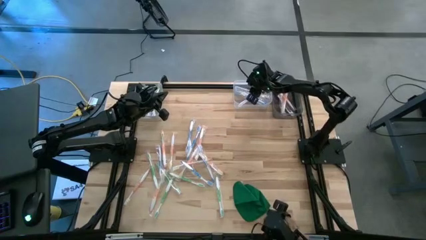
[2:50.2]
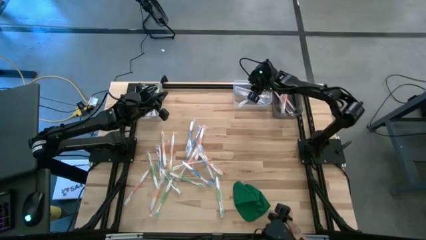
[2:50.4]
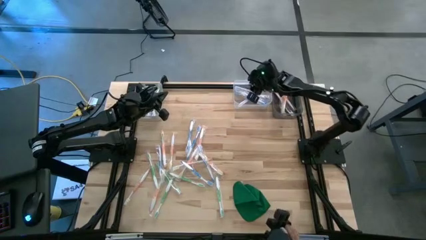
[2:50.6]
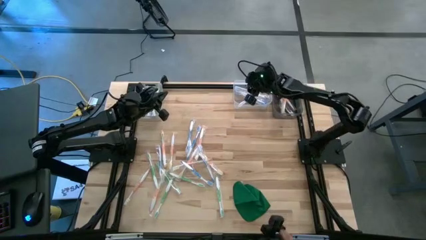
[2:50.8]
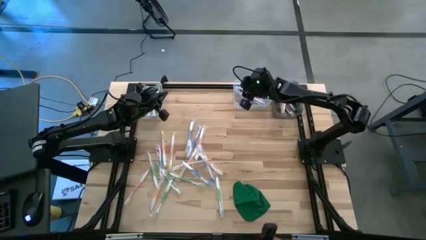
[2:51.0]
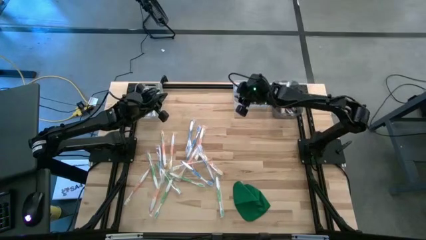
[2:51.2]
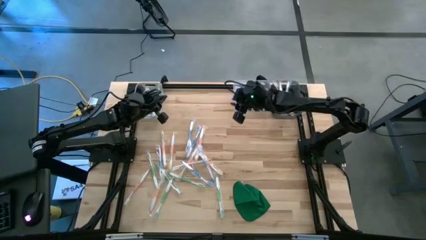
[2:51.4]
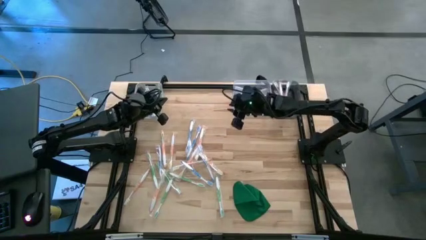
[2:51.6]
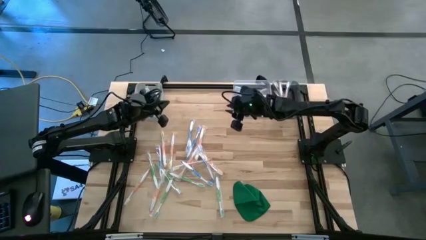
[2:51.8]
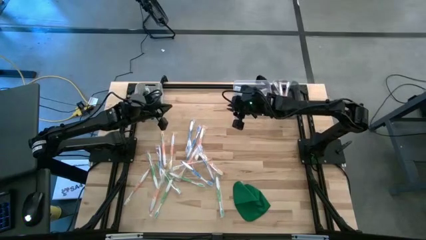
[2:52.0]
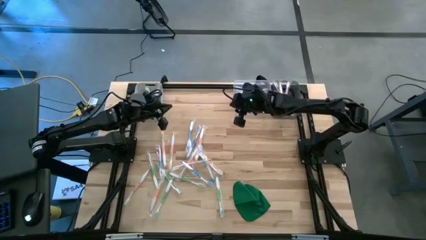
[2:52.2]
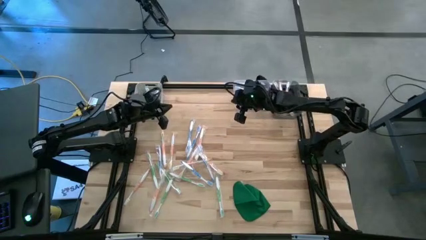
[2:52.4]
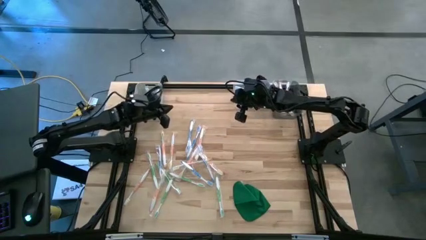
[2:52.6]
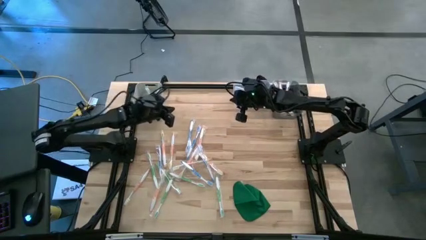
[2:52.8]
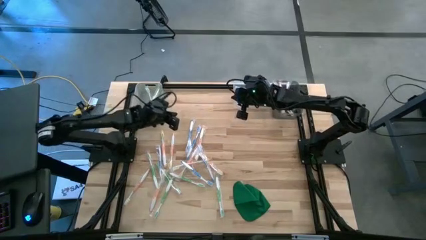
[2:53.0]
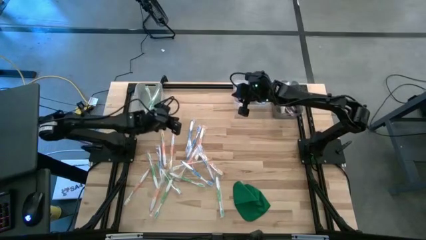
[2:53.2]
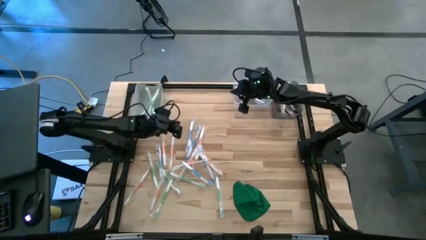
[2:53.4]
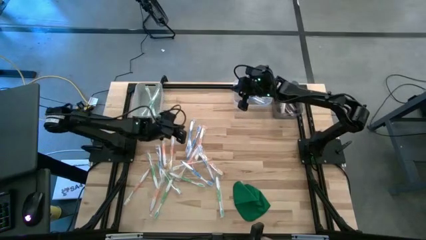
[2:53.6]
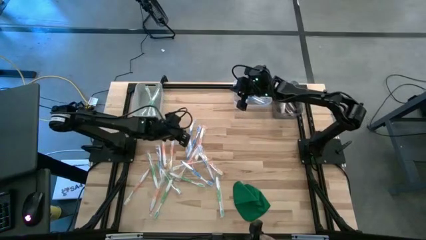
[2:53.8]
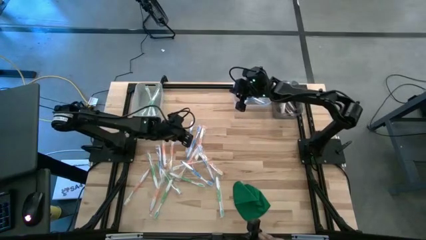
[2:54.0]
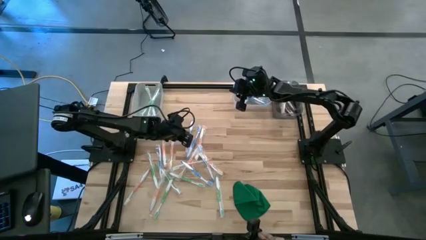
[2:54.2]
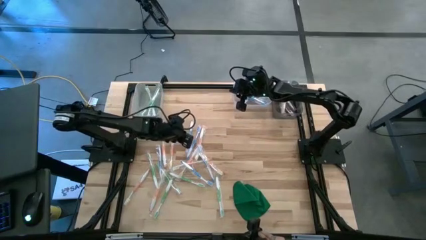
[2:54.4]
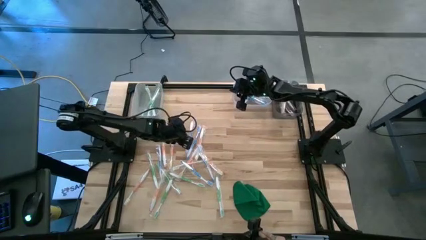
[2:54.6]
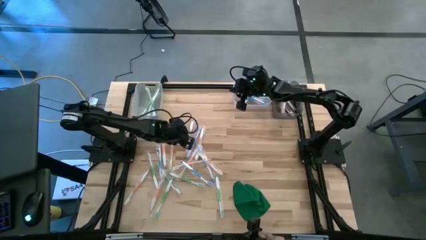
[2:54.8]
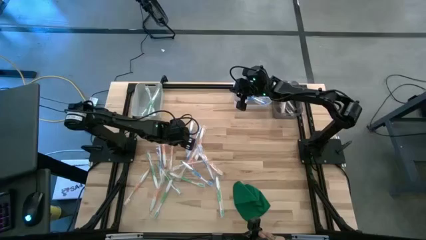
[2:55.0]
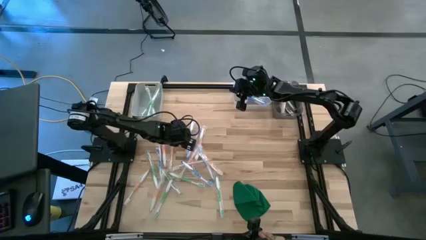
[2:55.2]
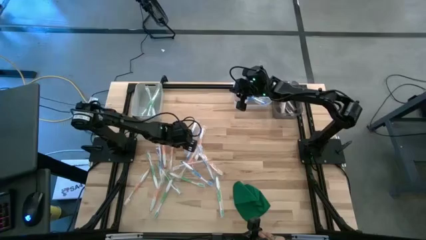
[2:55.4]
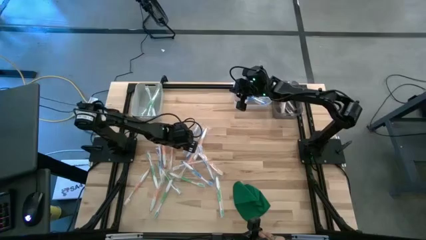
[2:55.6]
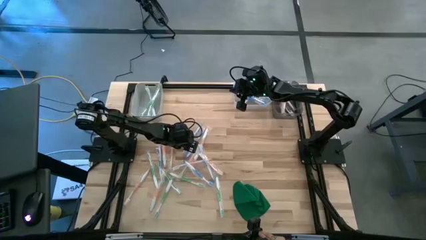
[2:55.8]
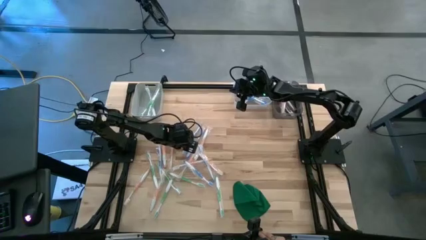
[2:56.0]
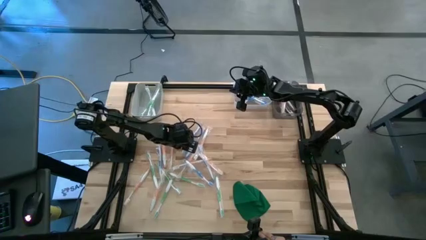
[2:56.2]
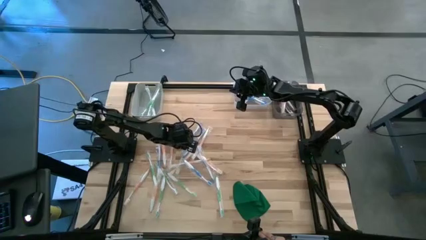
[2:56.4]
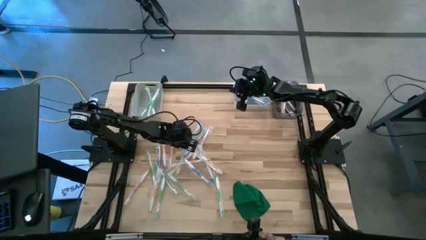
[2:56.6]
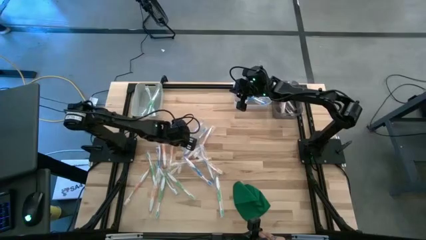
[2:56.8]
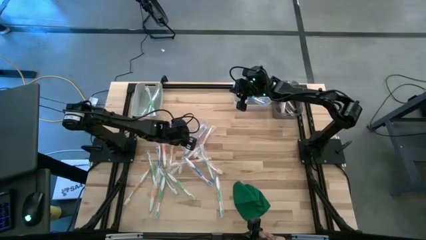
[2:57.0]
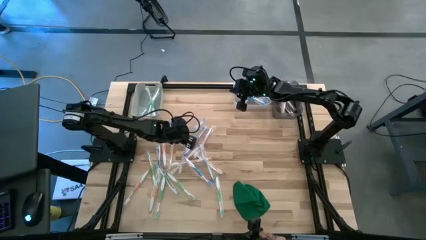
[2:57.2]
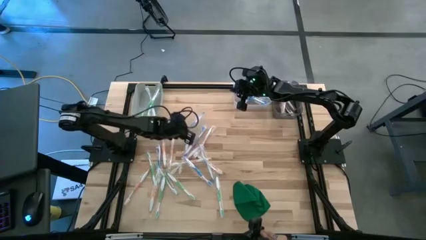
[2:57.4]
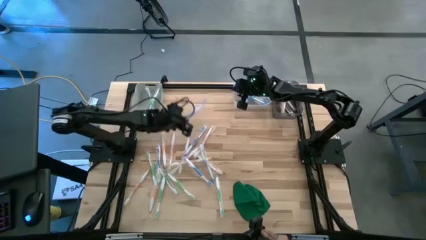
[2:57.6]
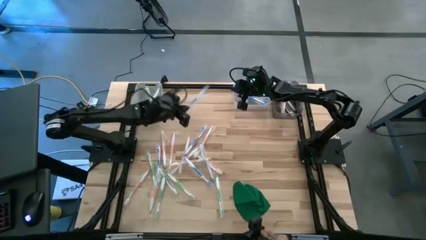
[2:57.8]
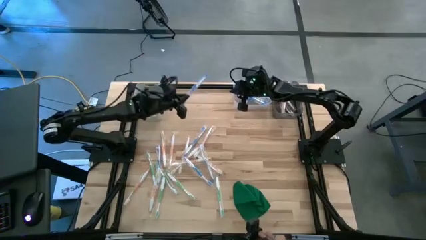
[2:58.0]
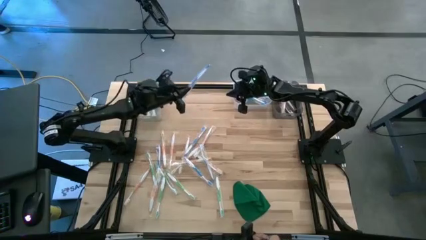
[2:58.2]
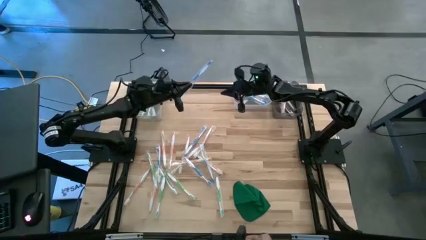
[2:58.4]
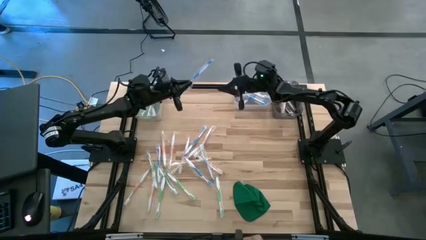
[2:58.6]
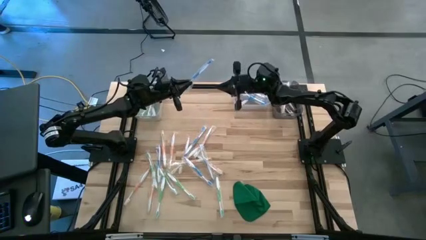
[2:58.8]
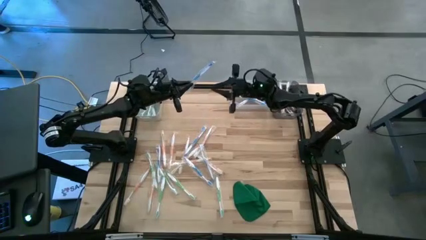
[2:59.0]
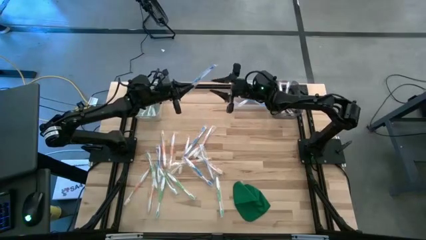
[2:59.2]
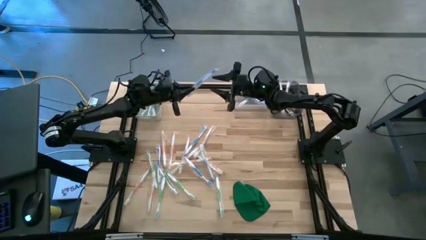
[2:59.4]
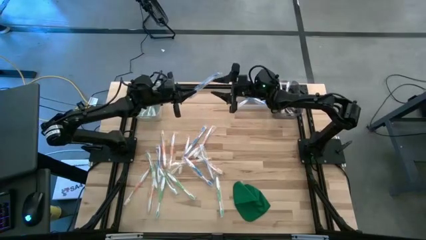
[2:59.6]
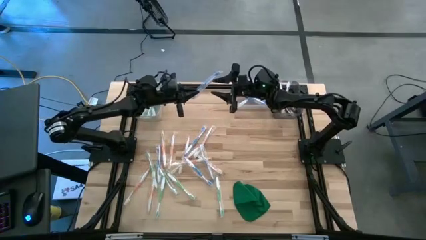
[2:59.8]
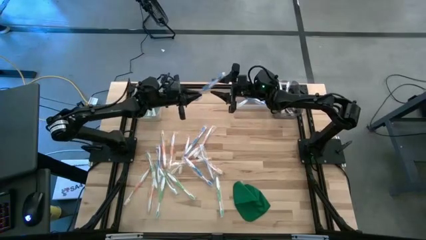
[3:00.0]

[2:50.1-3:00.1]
Task: Pick & Place Toothbrushes
Put the blue toothbrush into the transparent bin

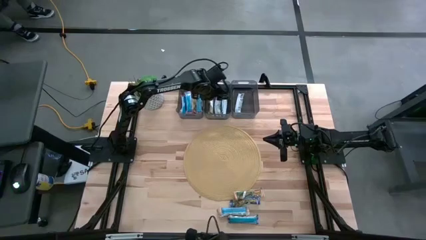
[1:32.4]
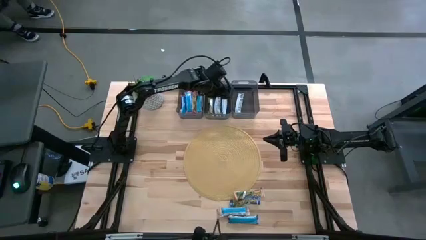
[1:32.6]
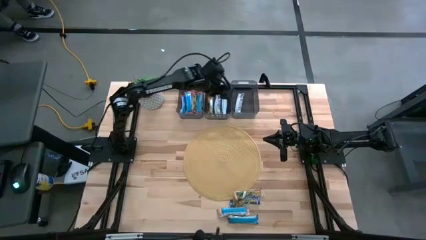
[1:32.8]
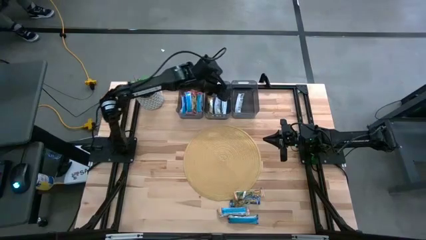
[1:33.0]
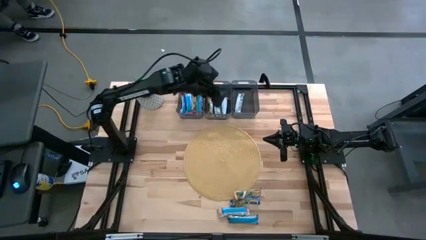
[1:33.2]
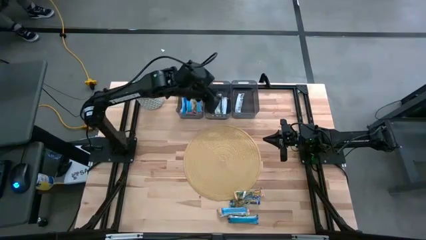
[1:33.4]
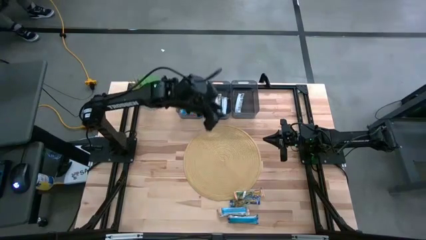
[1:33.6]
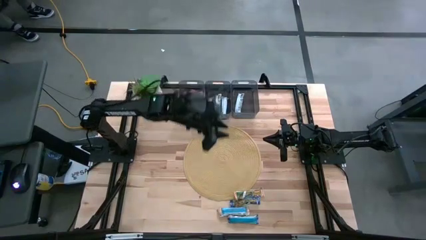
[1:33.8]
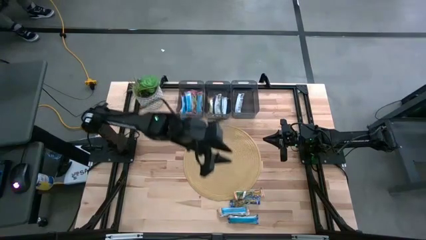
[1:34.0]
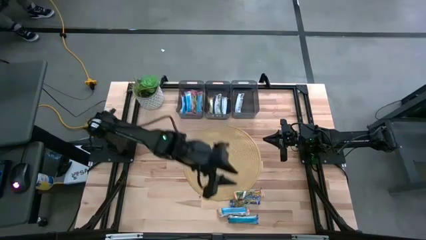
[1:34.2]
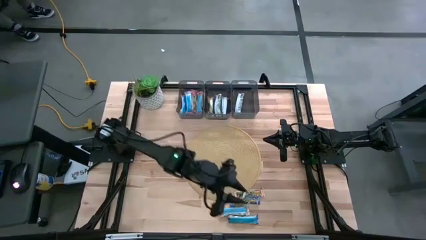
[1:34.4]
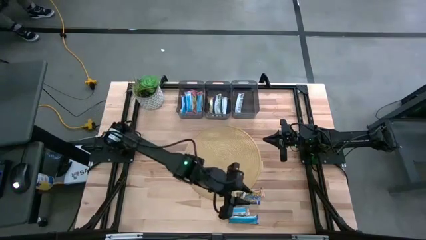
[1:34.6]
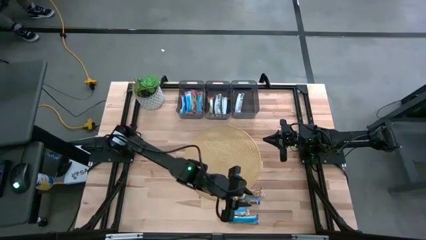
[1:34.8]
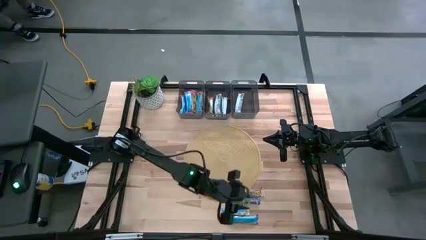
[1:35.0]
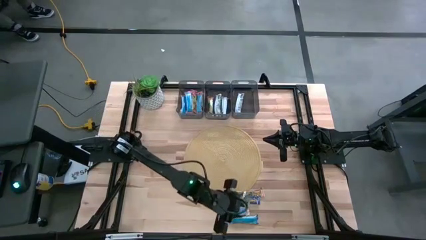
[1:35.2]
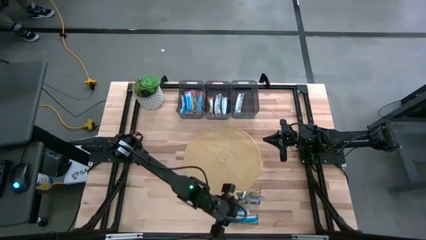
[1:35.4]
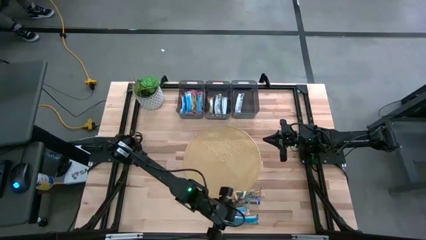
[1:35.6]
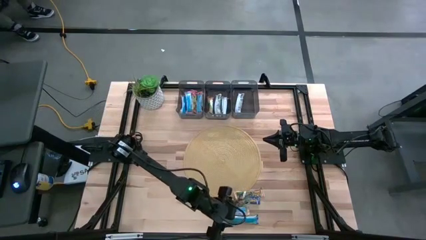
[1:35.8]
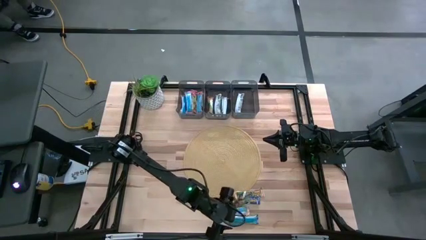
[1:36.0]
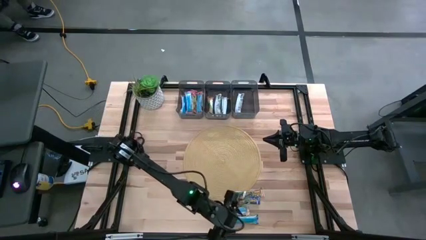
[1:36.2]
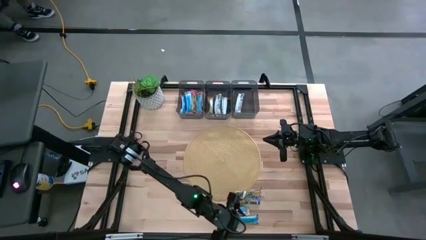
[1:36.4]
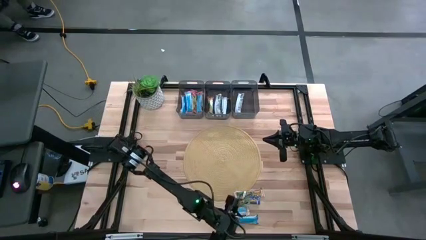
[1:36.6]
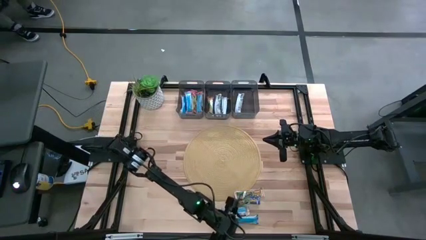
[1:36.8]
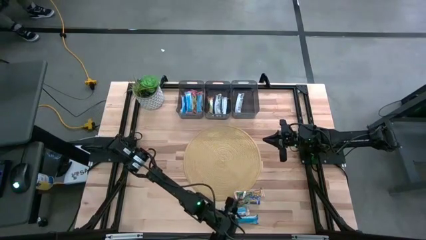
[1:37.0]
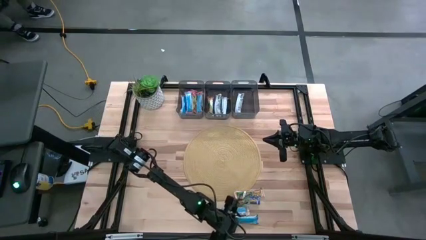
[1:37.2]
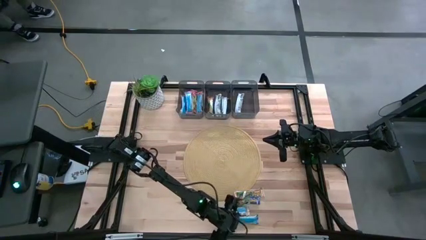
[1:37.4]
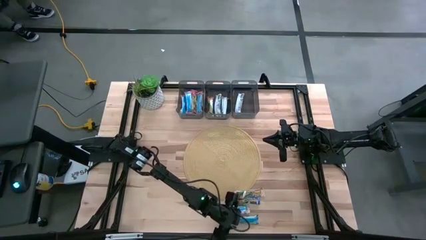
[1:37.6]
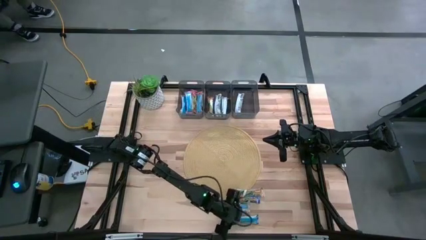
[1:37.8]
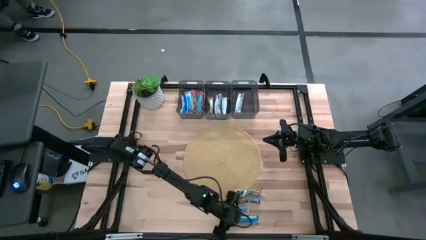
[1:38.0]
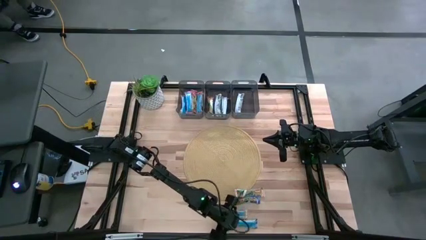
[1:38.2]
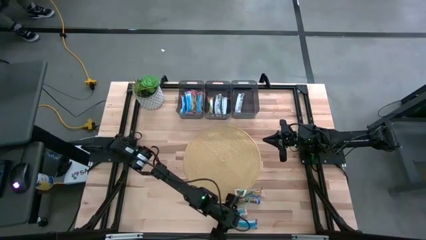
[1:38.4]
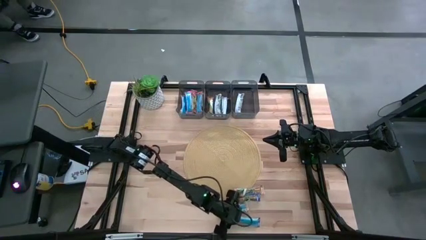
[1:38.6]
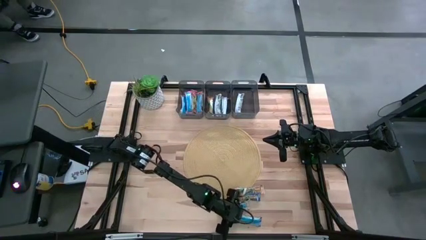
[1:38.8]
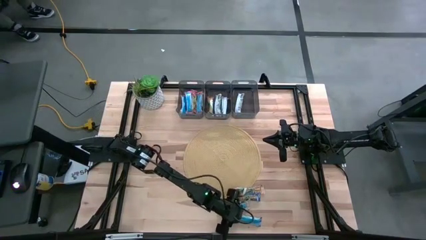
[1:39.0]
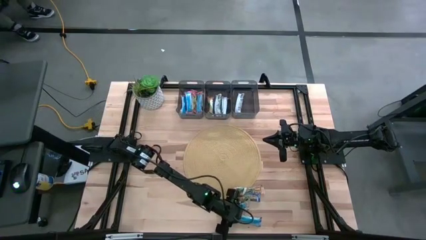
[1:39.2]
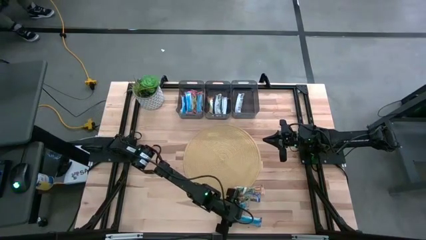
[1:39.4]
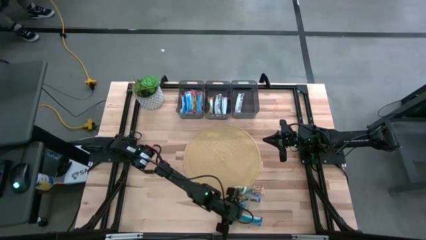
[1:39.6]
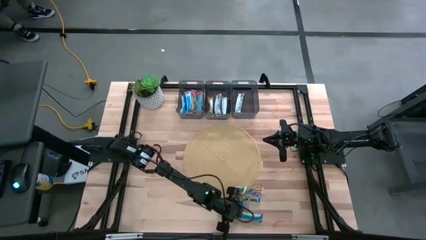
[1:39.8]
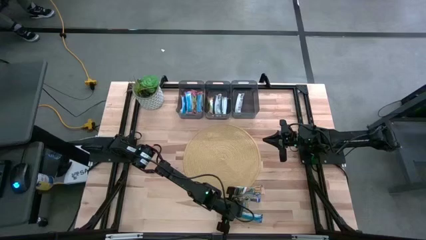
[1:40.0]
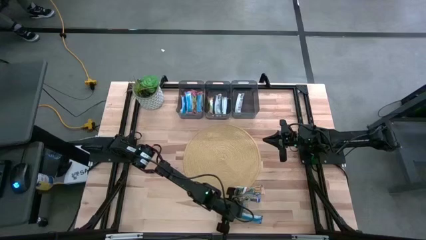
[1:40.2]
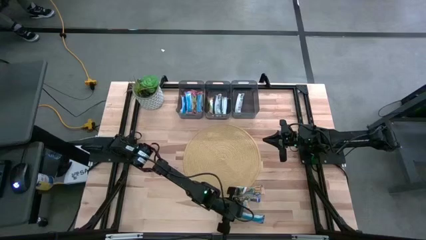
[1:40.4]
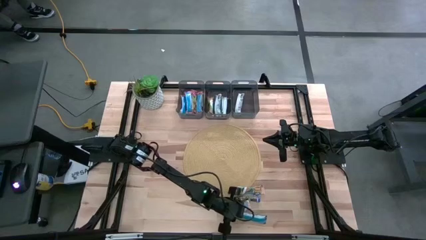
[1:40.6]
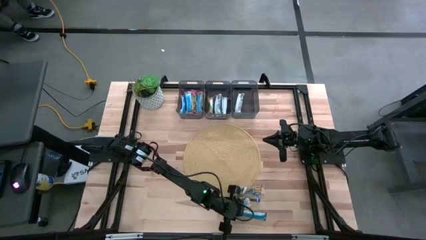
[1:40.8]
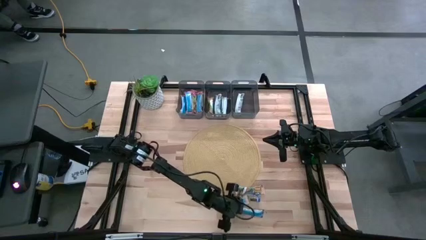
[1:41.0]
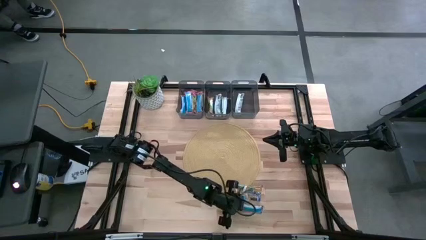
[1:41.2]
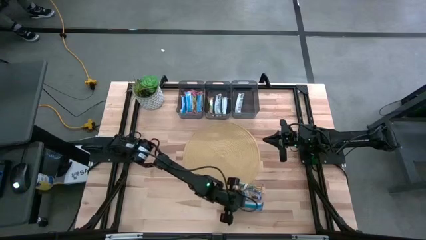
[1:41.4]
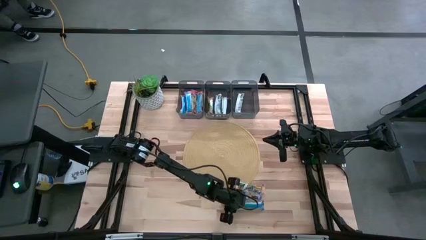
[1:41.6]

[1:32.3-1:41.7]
Task: Pick and place Granola Bars by type
Put the blue granola bar into the right black bin
